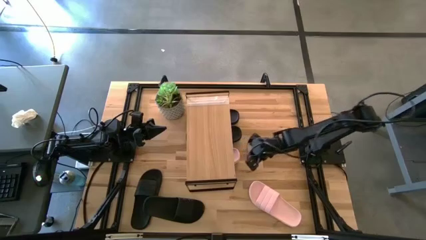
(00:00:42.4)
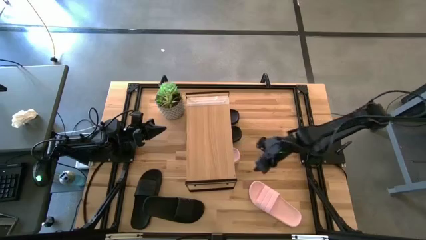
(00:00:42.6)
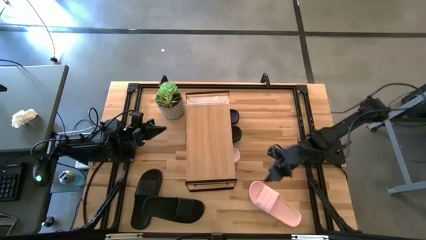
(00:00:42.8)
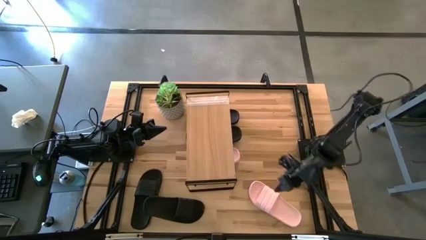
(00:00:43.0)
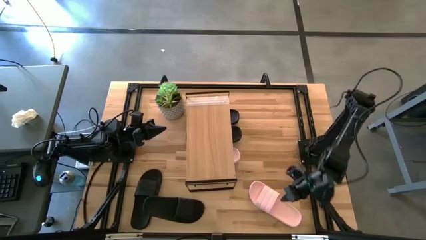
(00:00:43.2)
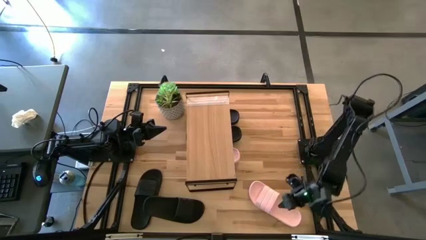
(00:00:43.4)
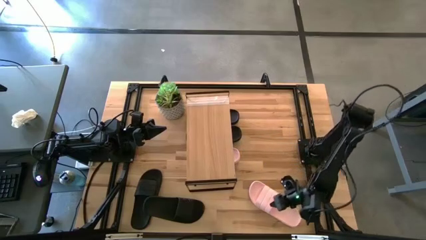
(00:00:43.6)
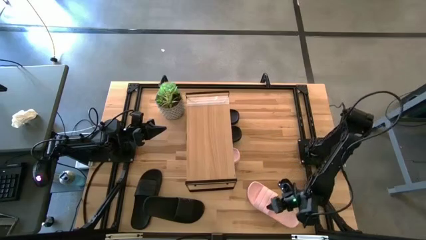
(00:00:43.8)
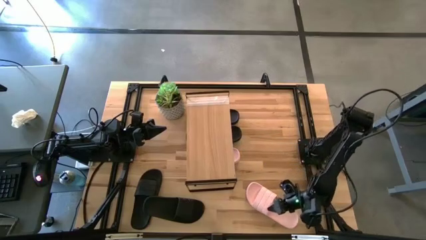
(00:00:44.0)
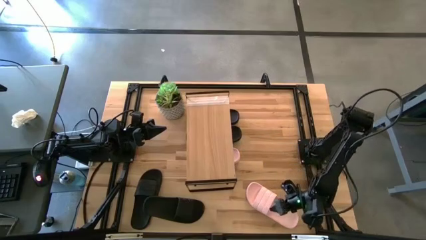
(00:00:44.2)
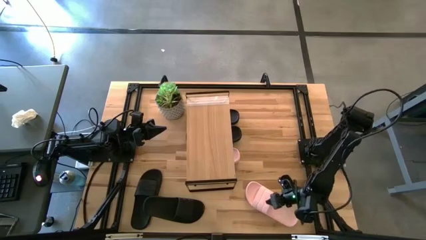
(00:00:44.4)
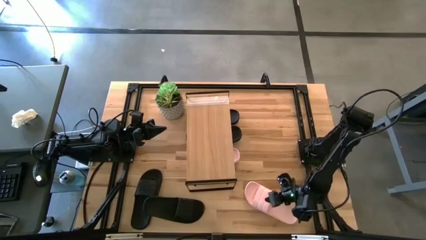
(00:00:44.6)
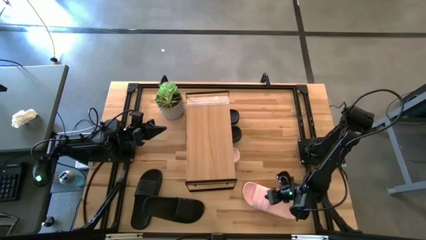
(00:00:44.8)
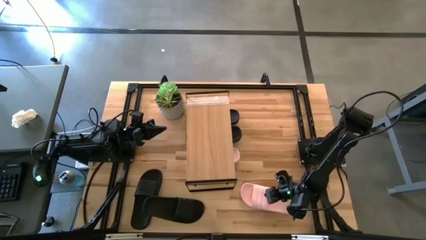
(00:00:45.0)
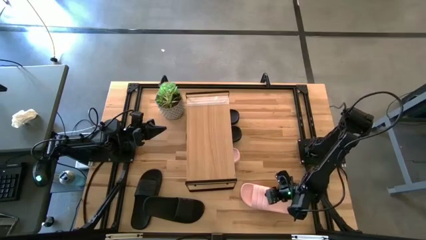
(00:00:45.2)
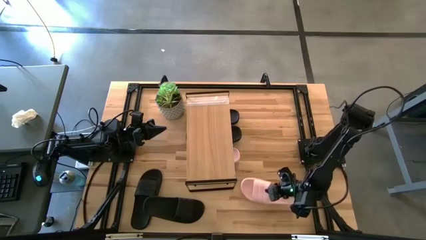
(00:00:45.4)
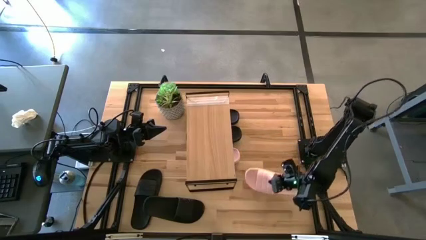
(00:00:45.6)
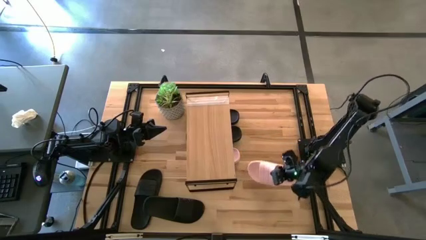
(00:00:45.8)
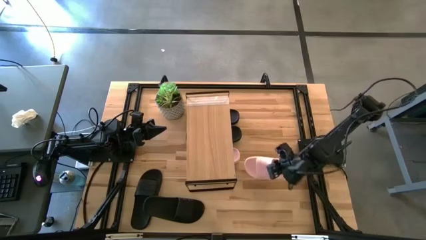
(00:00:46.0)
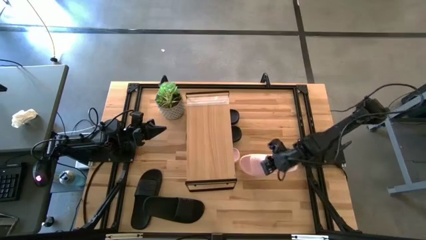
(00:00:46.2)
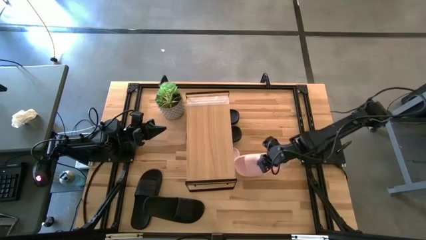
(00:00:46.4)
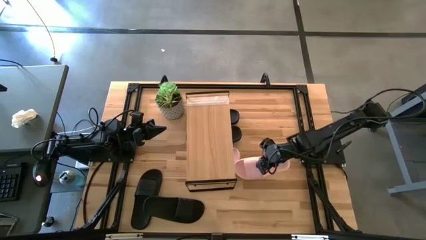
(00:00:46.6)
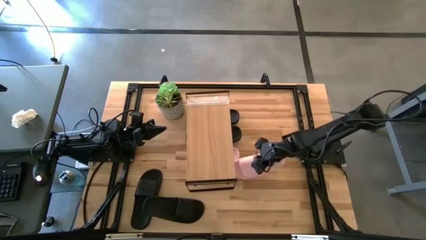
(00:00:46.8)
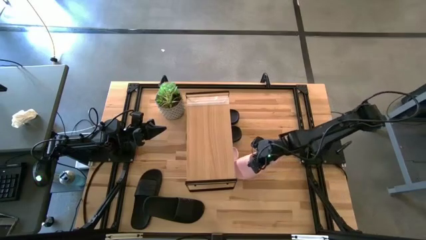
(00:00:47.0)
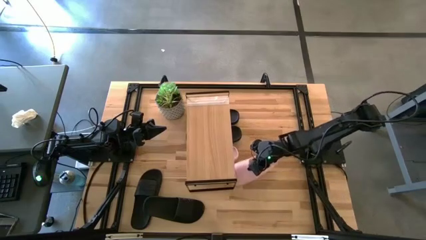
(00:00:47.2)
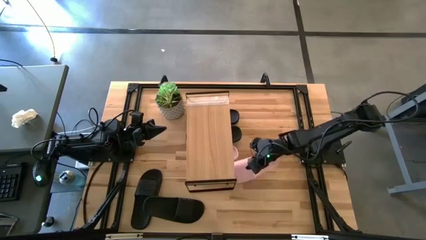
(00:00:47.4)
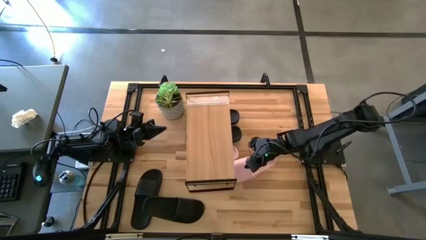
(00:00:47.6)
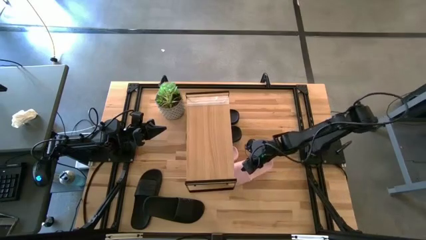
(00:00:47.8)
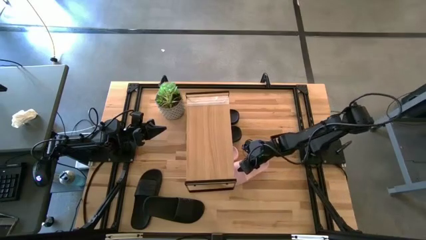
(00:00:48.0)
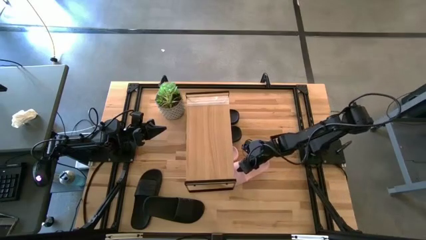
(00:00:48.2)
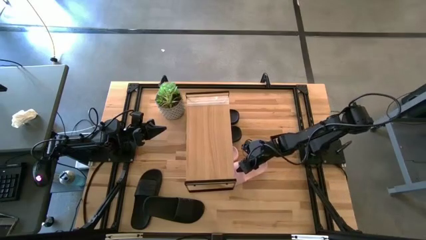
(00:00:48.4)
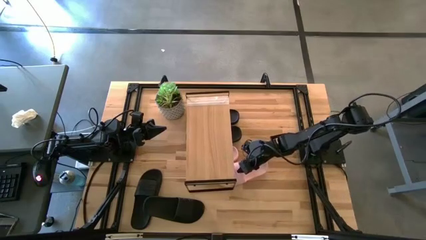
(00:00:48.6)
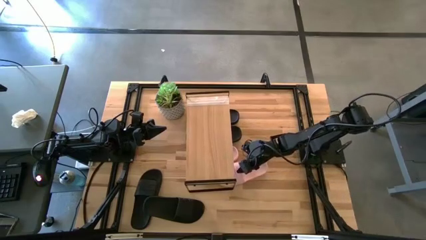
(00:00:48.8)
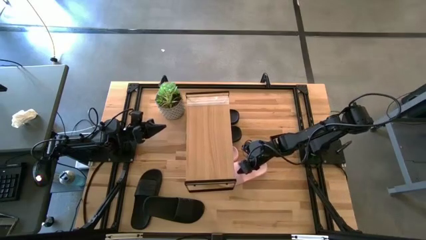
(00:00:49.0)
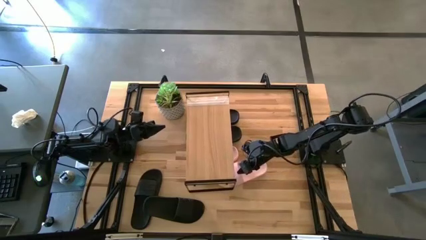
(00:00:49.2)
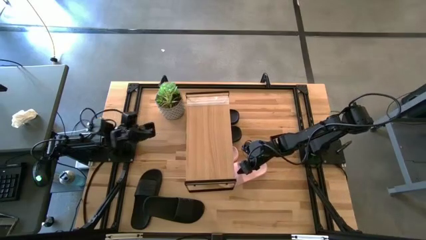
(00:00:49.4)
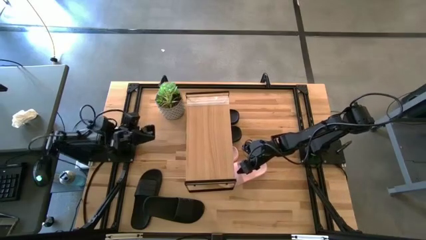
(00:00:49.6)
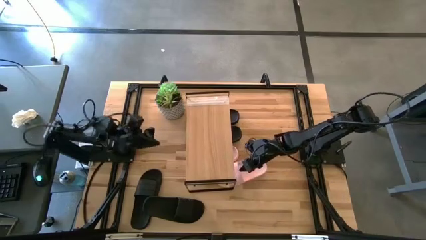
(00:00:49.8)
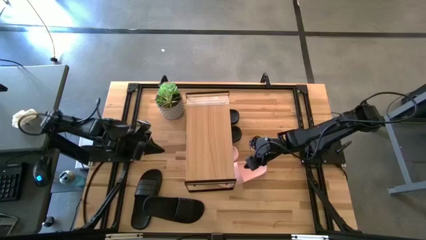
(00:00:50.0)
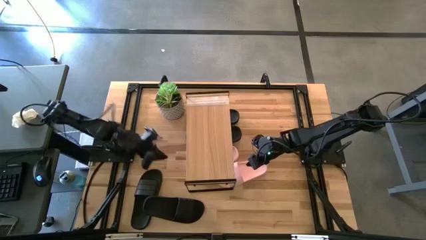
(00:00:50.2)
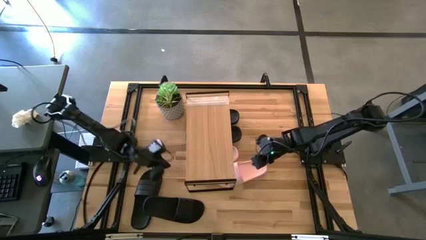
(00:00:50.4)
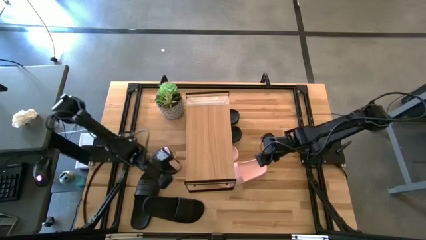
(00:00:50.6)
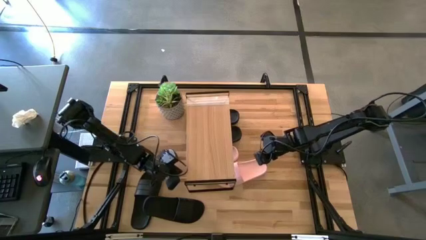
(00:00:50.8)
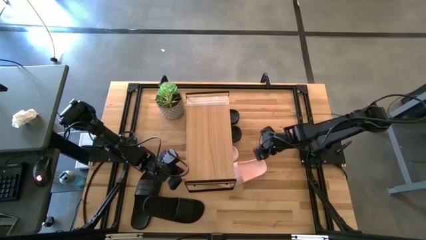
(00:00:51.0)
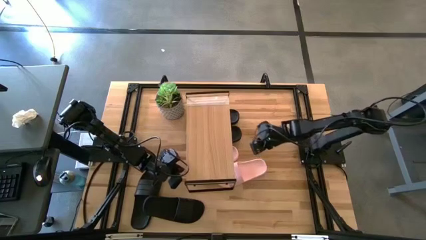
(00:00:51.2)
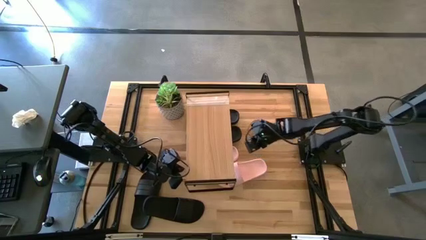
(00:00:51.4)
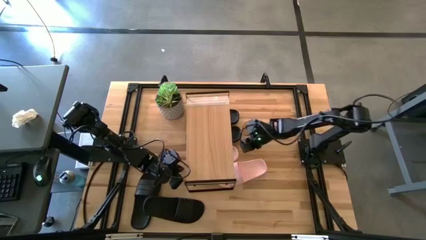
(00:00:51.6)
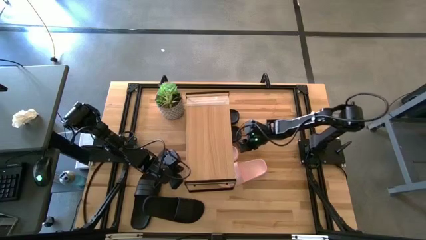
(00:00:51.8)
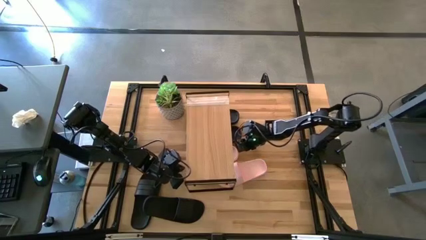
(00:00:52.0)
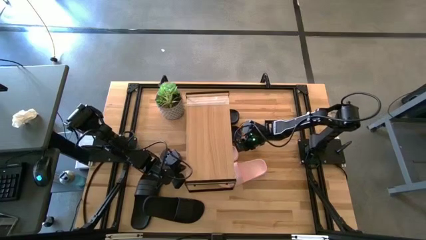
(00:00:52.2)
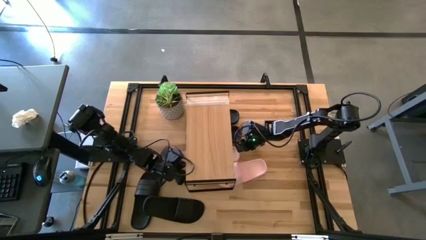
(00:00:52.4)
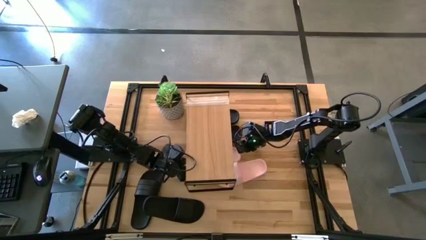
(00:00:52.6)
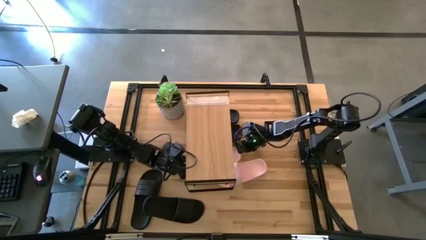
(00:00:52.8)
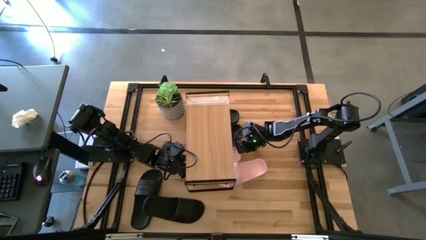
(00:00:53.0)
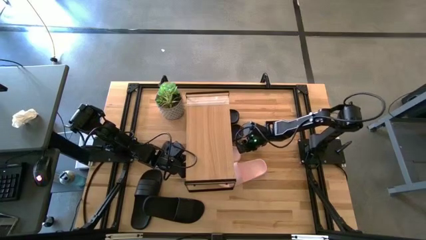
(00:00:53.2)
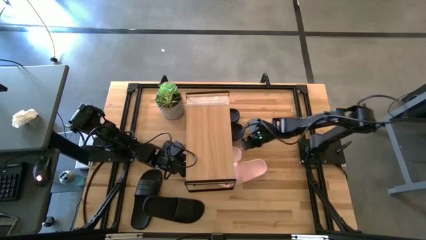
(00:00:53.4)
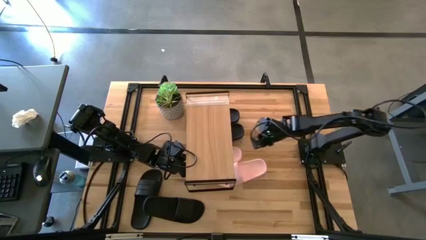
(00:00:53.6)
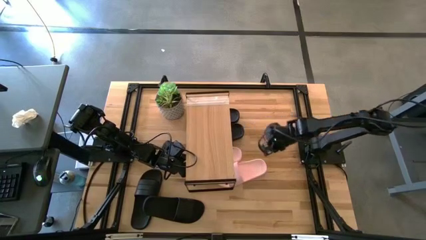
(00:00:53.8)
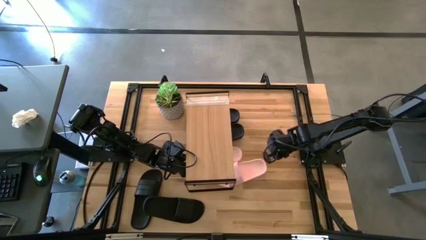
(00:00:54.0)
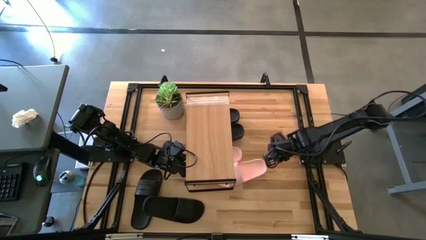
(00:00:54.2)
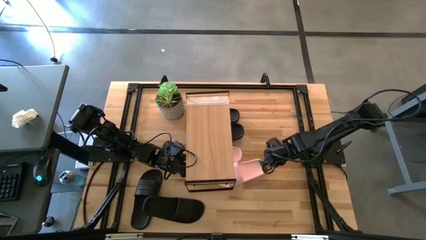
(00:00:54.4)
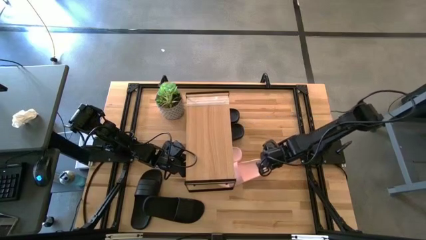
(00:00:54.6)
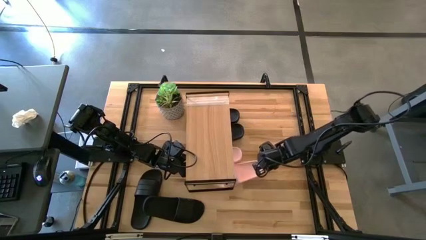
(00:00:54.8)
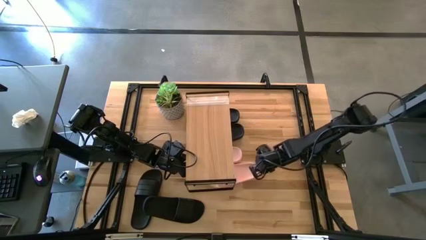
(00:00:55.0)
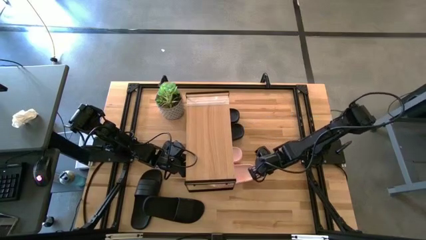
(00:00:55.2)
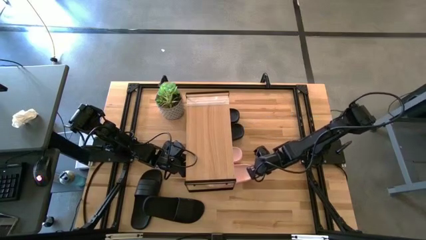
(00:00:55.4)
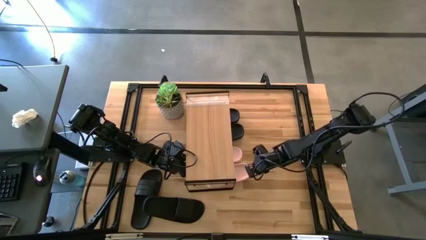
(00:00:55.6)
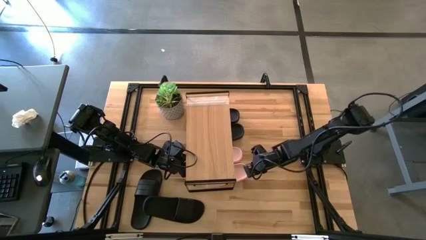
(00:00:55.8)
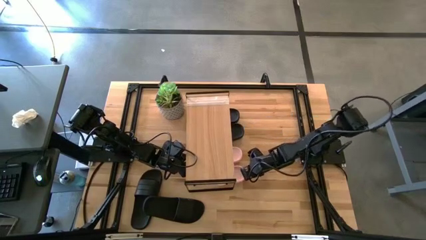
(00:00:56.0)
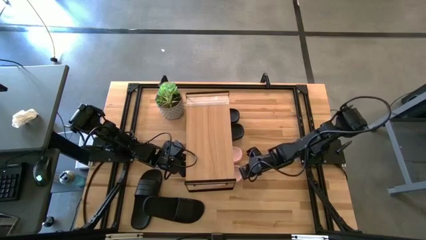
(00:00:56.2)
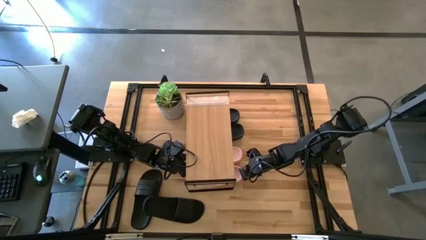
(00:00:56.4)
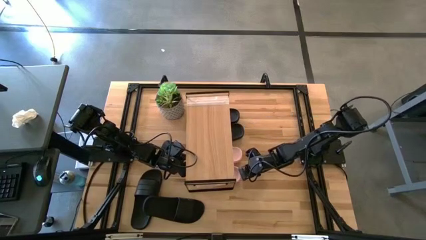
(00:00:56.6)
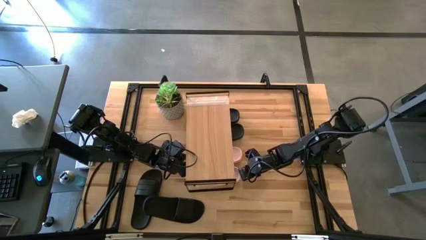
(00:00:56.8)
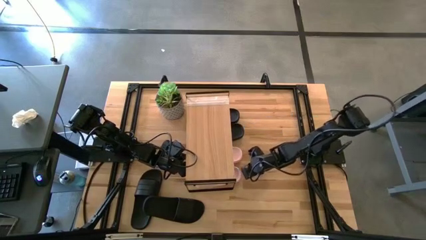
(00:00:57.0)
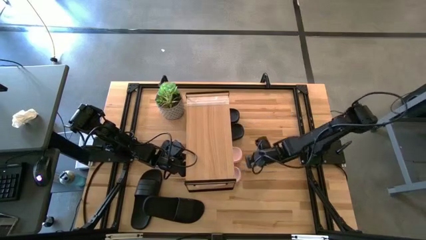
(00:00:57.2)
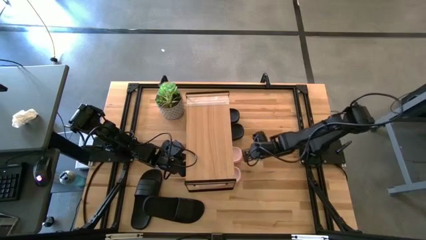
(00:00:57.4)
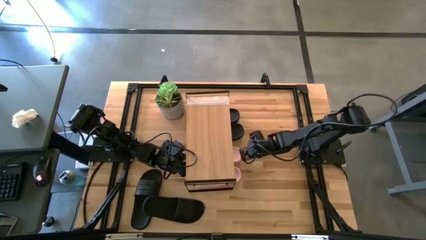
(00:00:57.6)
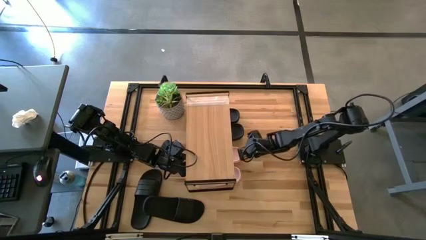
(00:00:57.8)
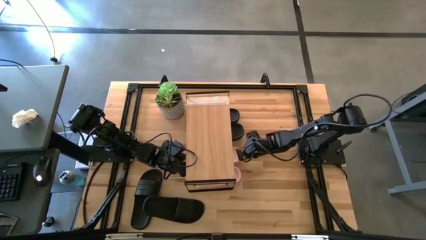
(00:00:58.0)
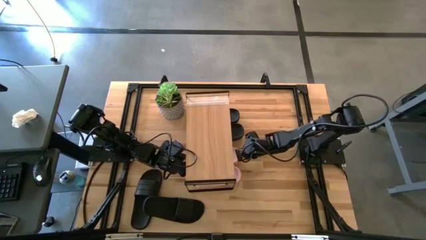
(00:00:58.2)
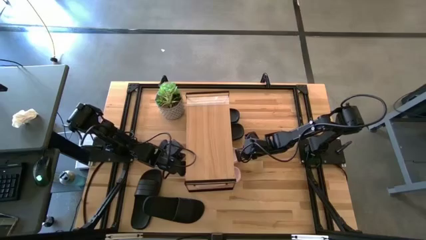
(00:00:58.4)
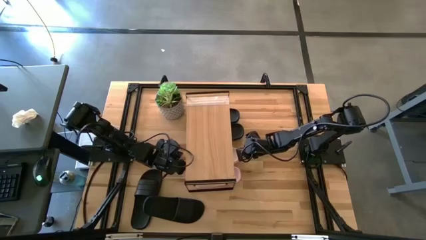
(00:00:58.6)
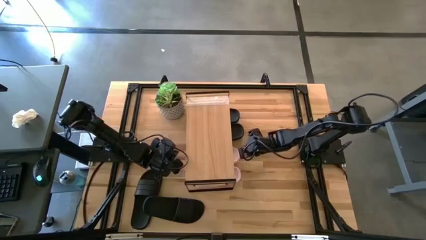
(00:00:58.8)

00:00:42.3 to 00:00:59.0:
Task: Pick and place slides into the shelf
Move the pink slide under the shelf
